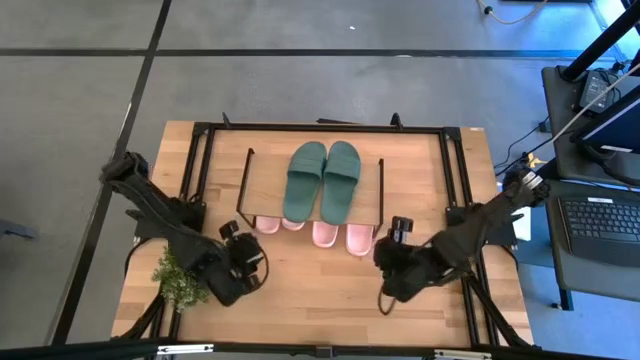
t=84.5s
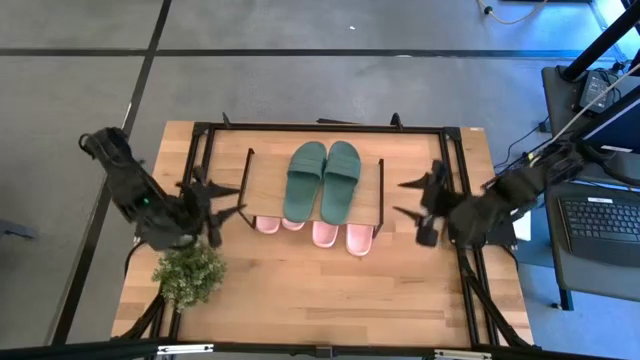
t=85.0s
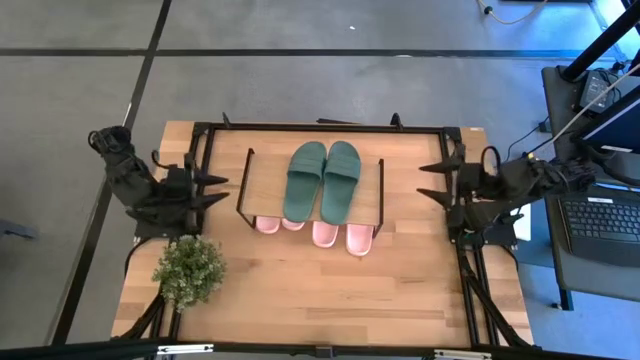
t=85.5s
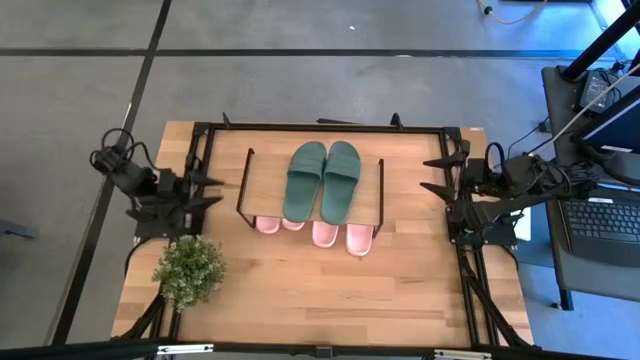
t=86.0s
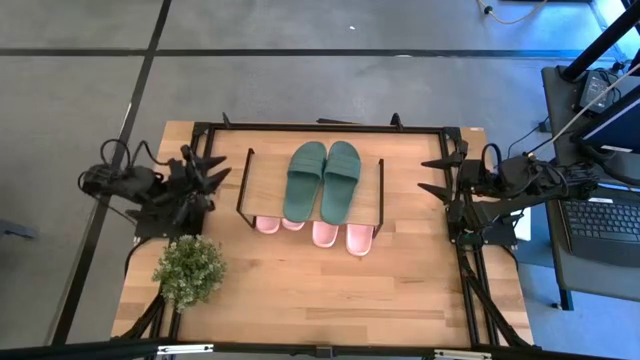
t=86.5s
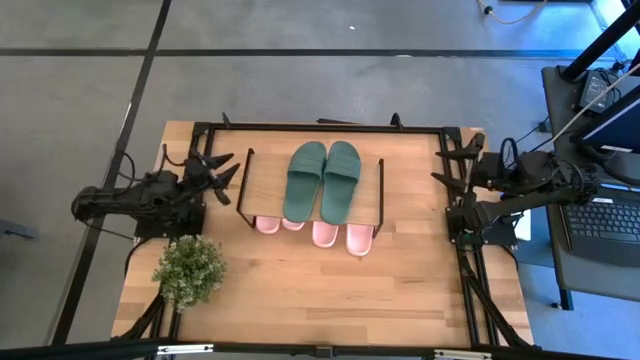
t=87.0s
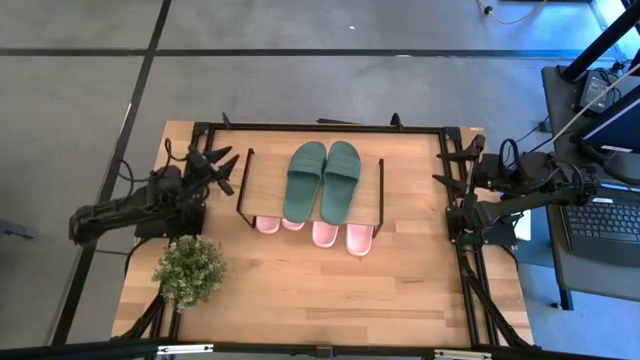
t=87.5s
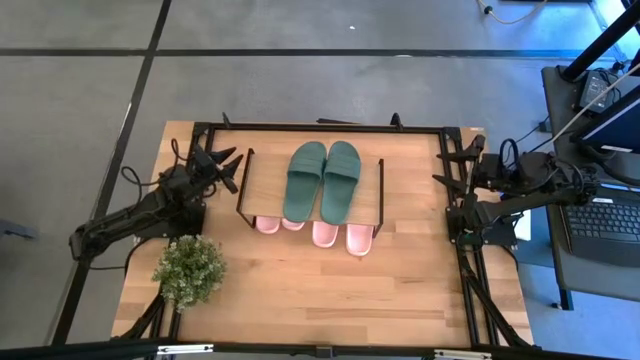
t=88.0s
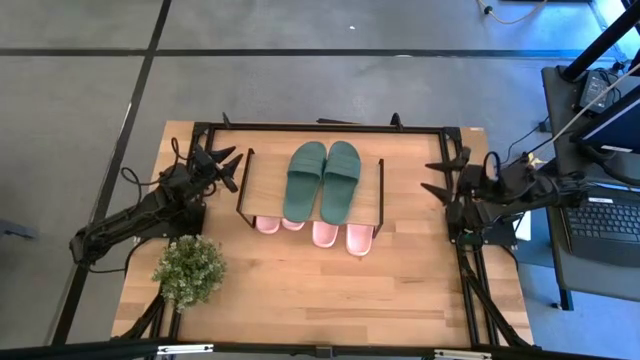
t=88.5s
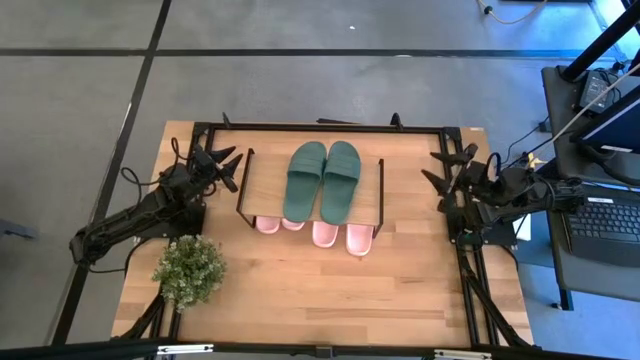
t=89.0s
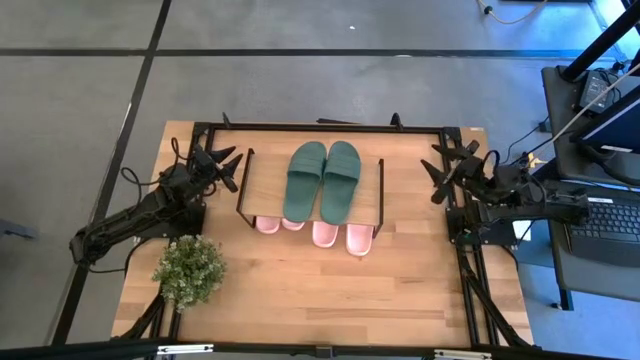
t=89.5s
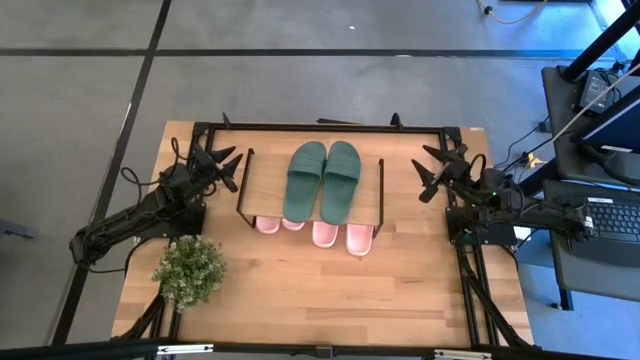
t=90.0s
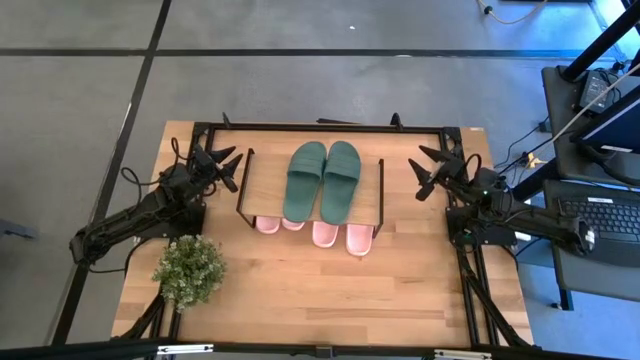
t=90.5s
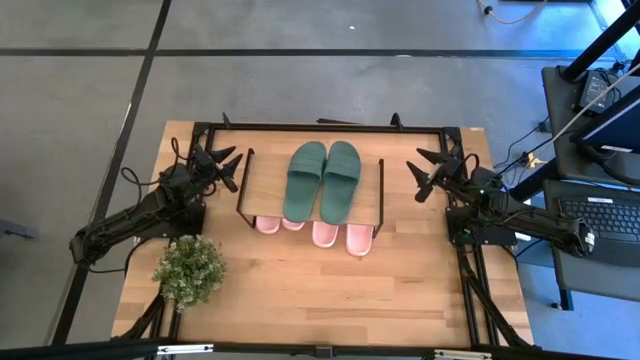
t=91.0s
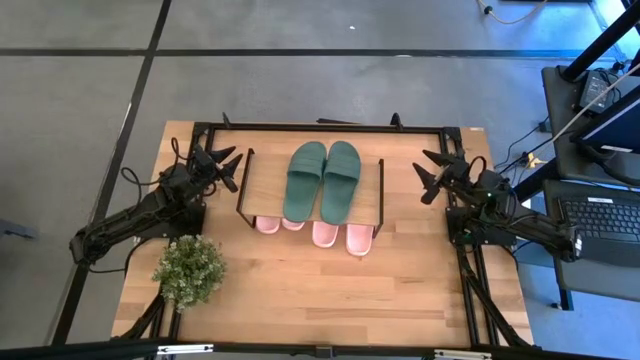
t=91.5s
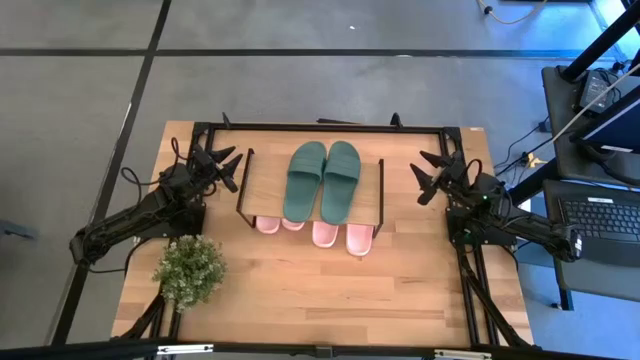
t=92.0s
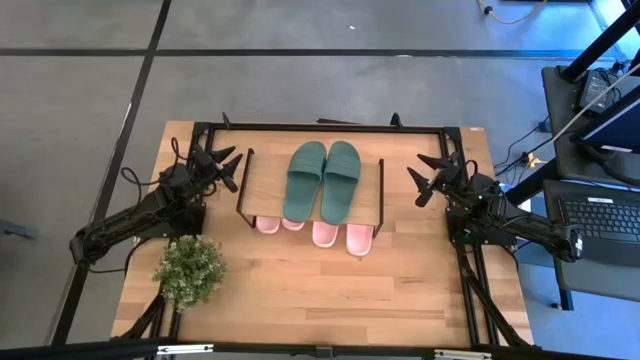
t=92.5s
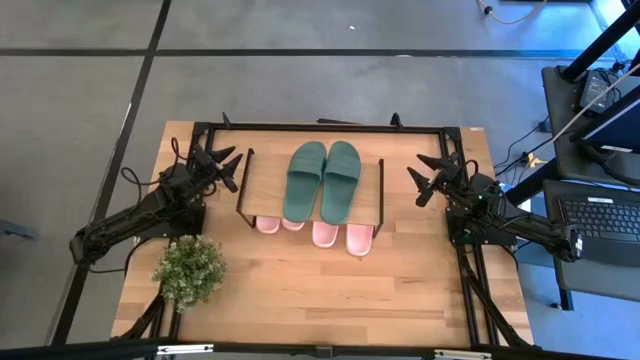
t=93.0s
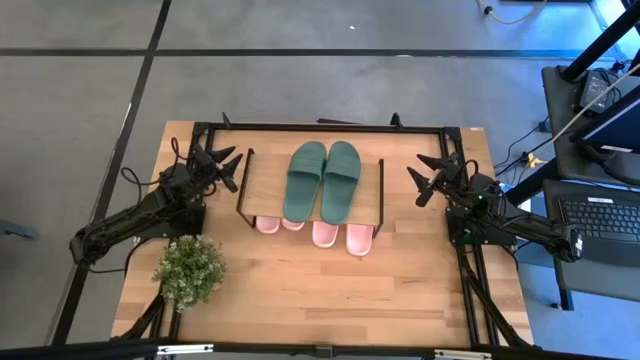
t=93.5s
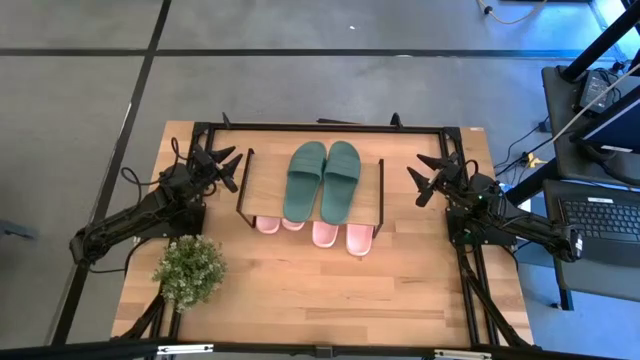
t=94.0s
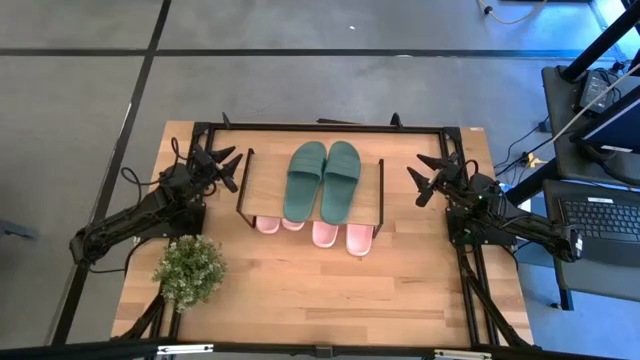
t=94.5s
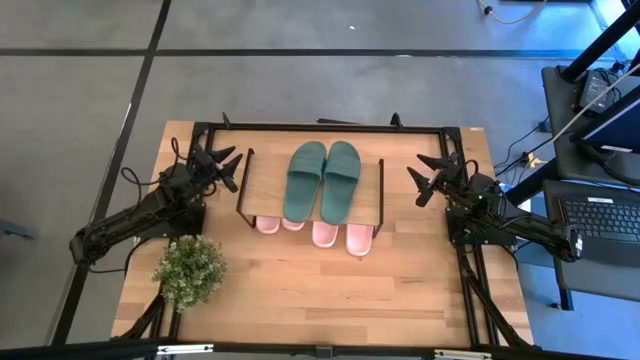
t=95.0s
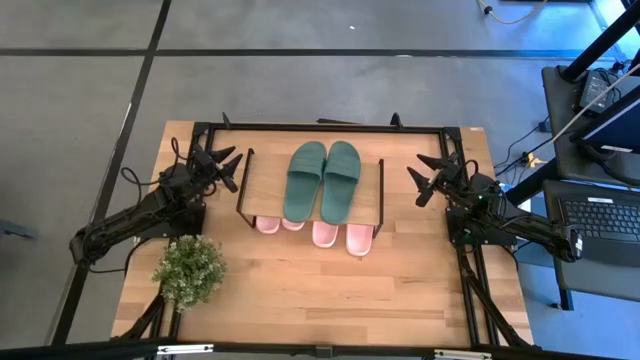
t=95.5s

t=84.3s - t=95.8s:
Task: Pick and place slides into the shelf
Return to Home Position

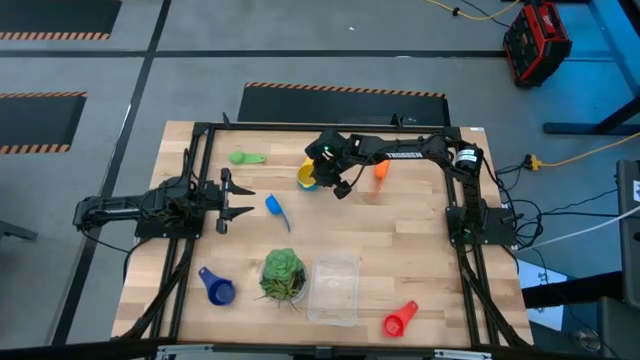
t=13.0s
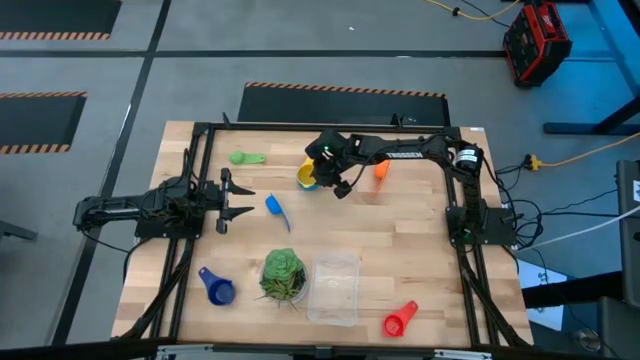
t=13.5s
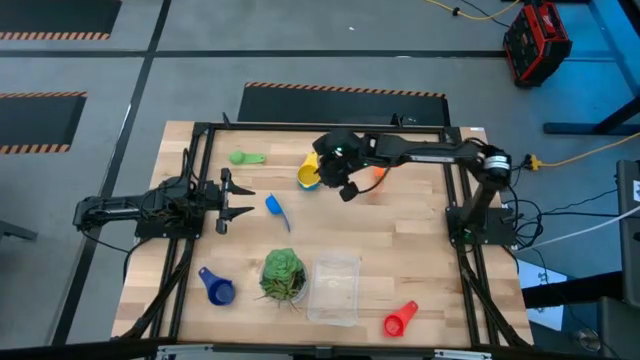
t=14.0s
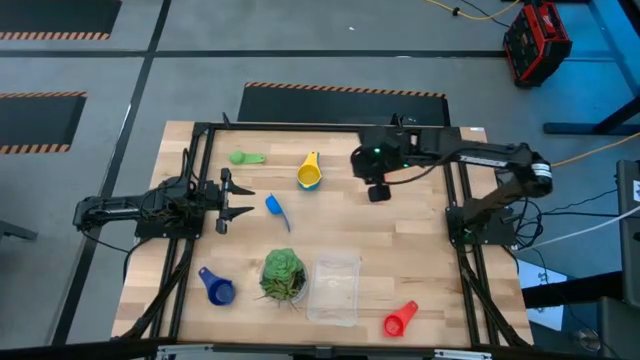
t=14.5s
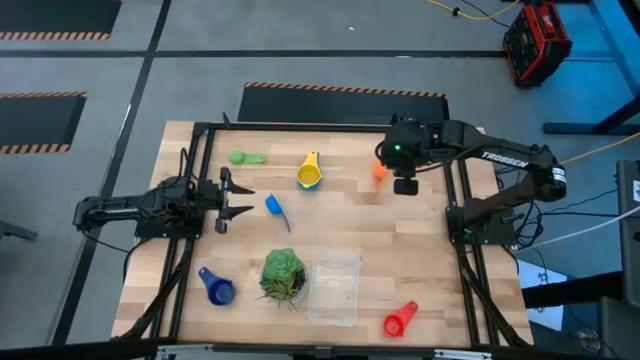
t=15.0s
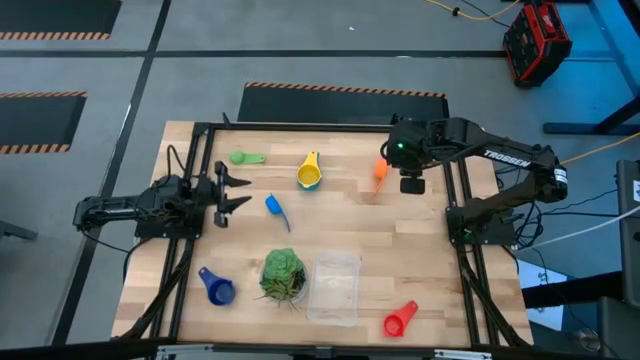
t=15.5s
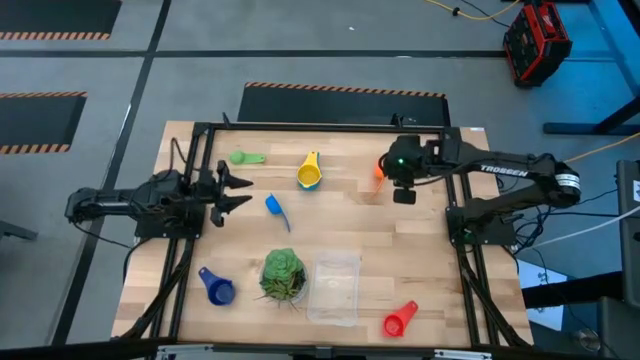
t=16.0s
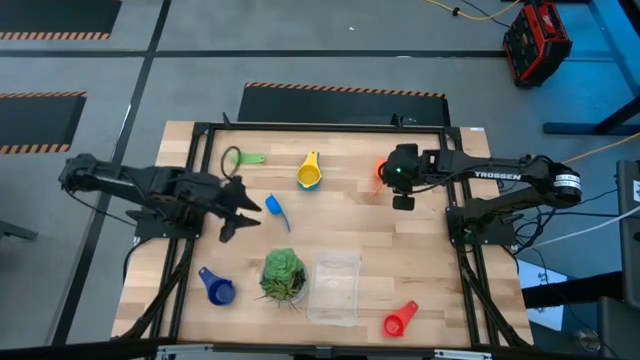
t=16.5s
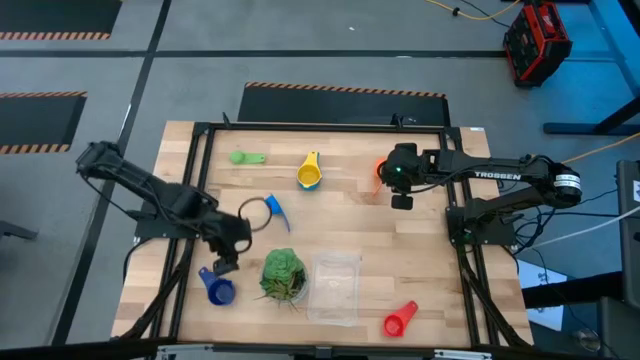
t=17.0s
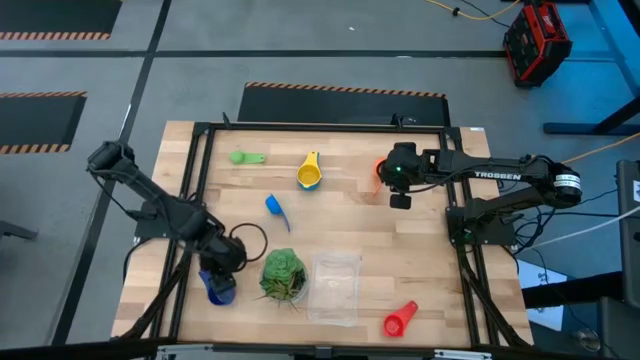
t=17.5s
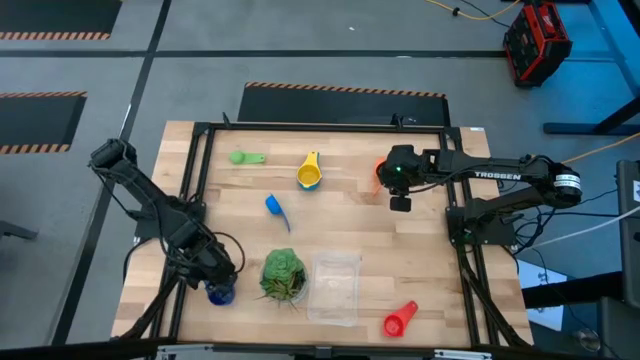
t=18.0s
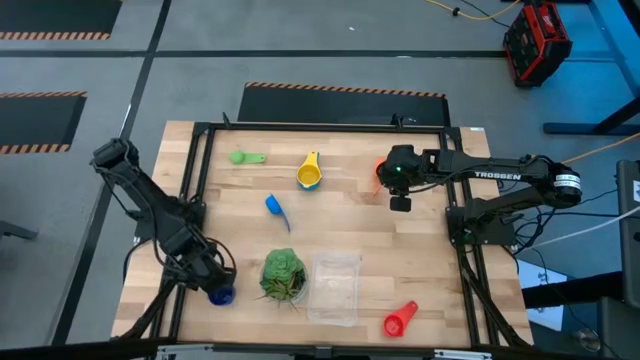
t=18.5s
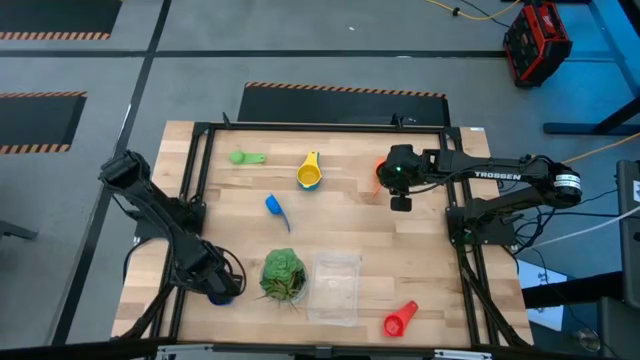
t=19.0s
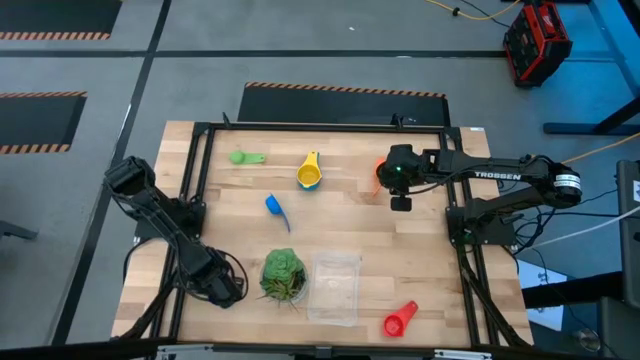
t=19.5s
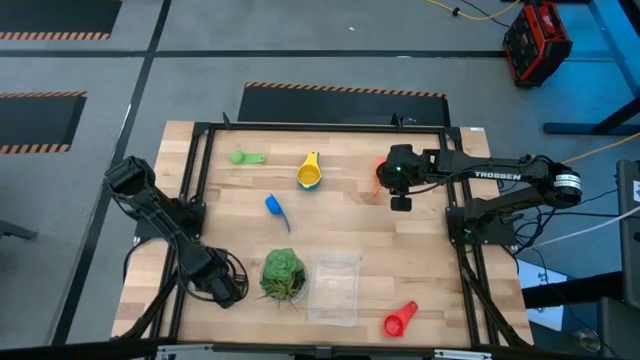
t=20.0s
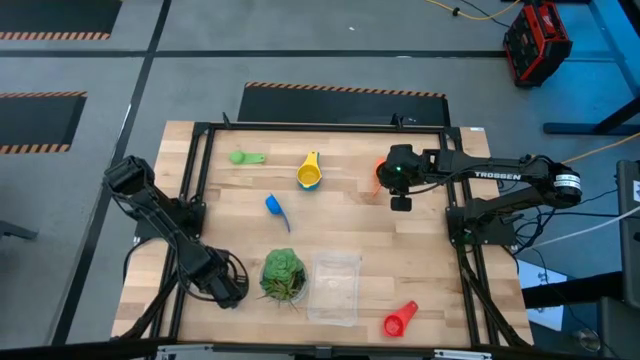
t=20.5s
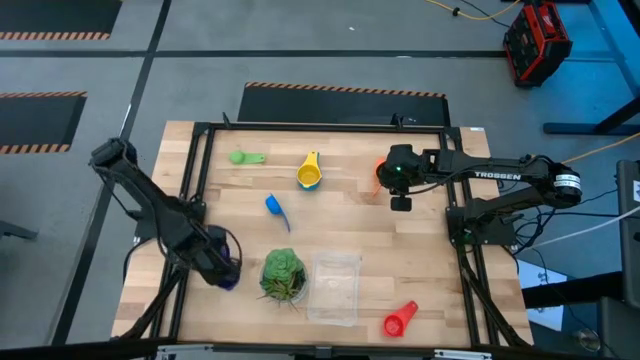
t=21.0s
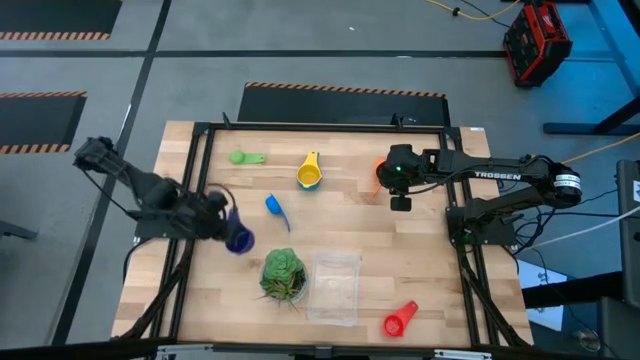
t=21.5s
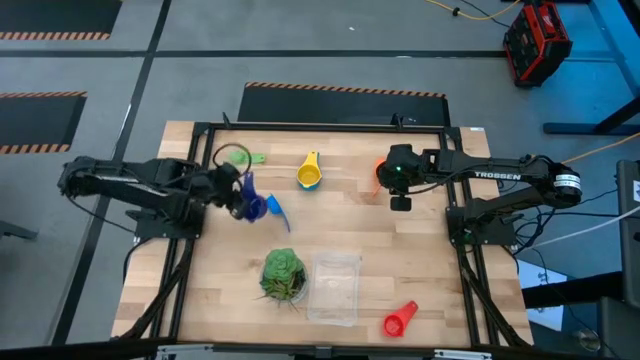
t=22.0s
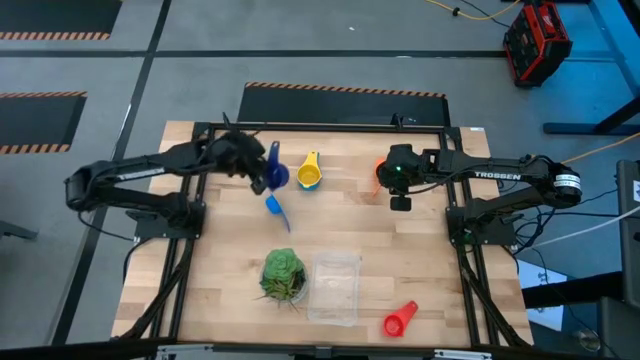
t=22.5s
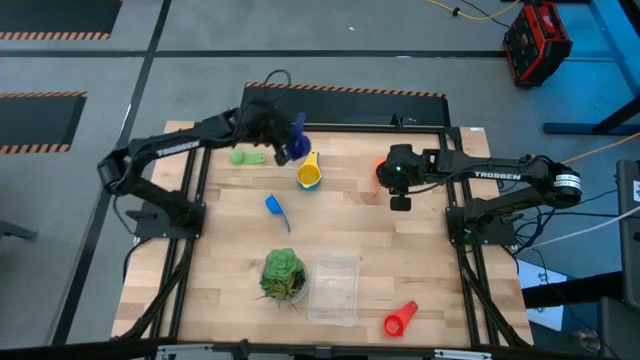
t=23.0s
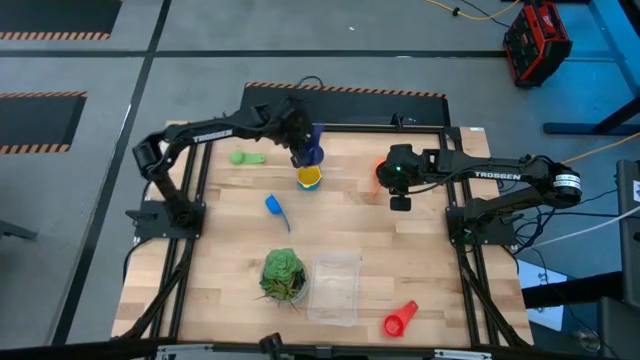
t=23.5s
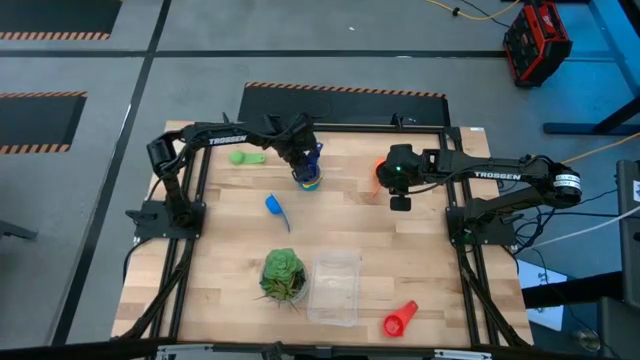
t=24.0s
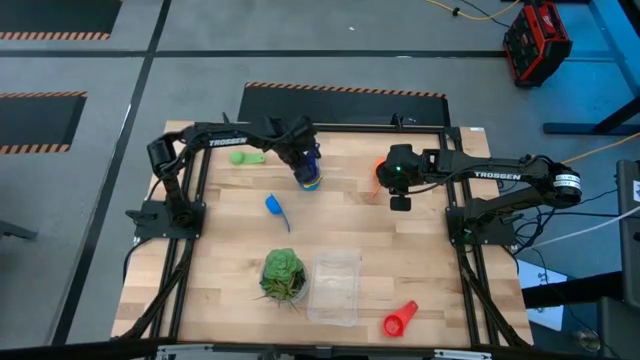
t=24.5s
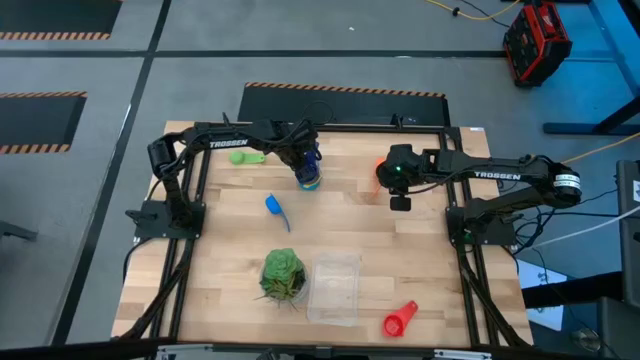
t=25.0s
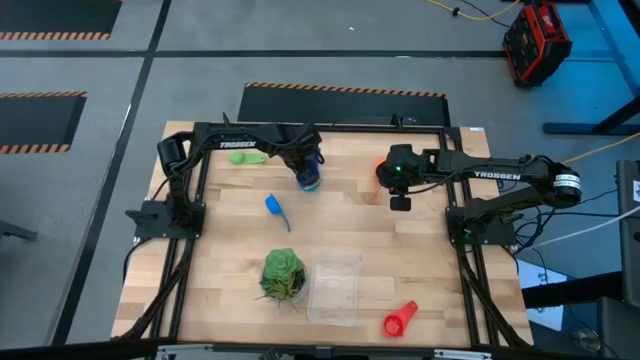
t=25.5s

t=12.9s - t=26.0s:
Task: Nest measuring cups in basket
Stack the dark blue measuring cup on top of the yellow measuring cup
